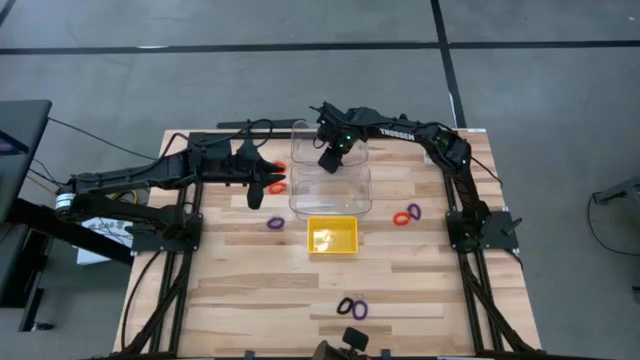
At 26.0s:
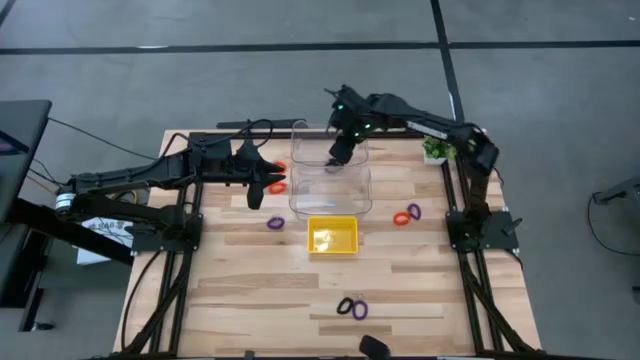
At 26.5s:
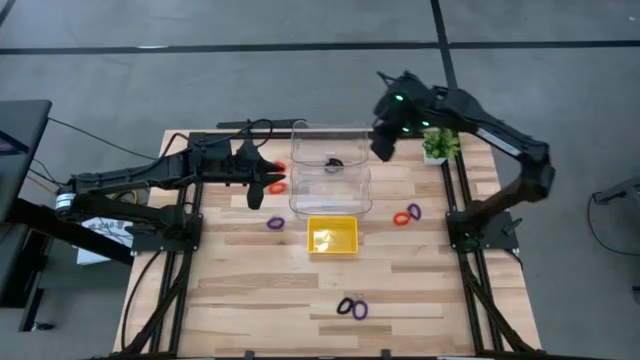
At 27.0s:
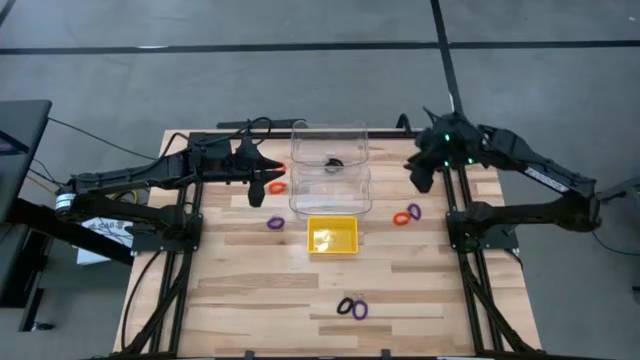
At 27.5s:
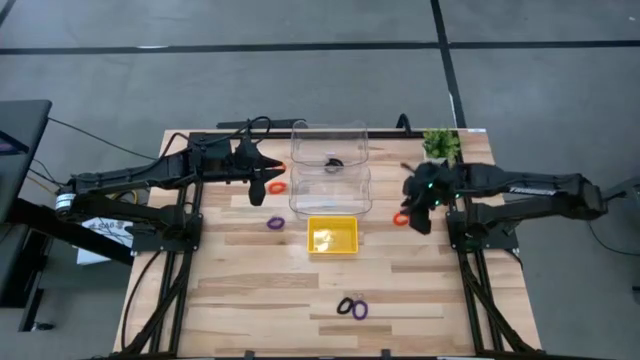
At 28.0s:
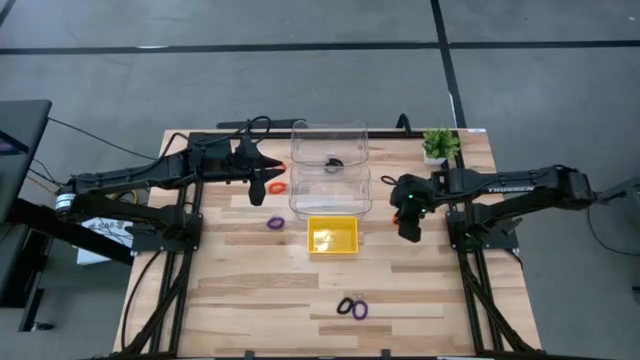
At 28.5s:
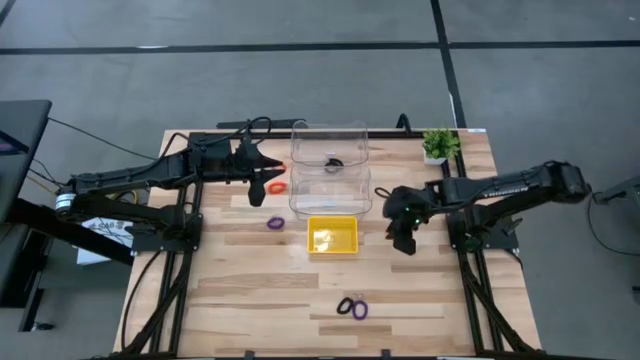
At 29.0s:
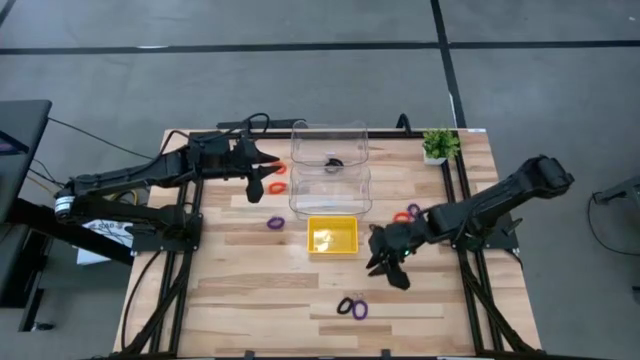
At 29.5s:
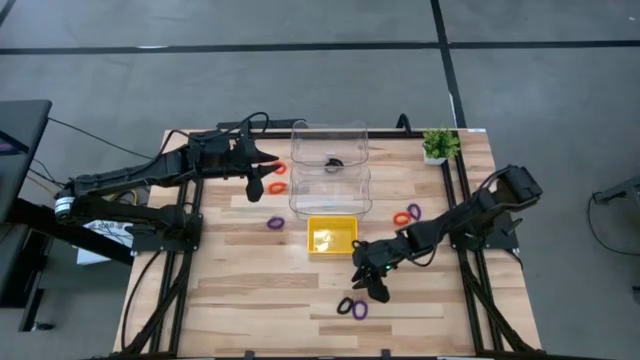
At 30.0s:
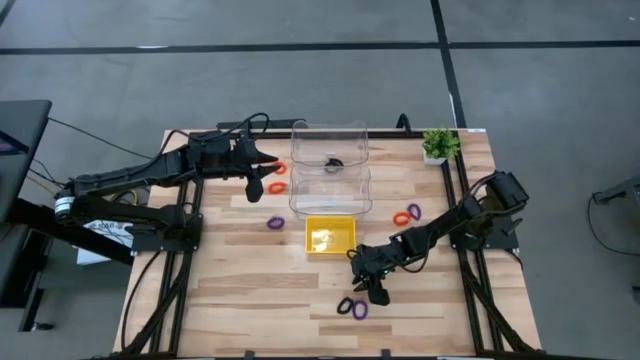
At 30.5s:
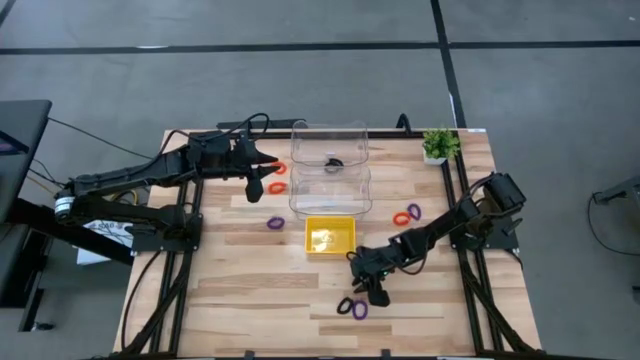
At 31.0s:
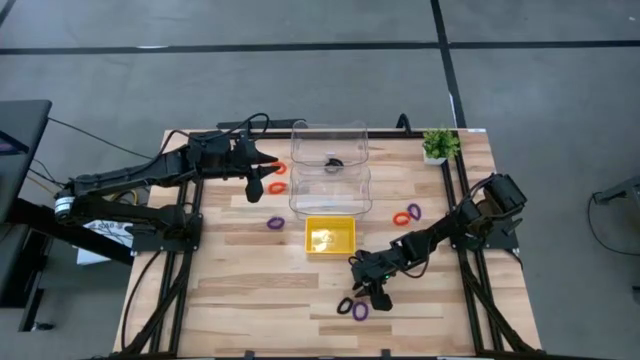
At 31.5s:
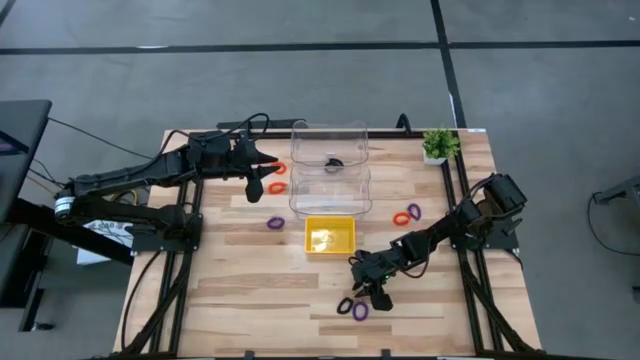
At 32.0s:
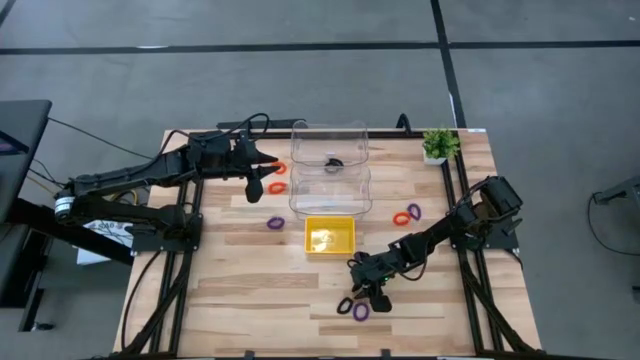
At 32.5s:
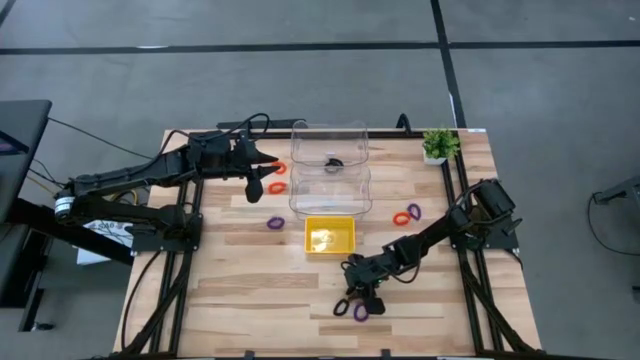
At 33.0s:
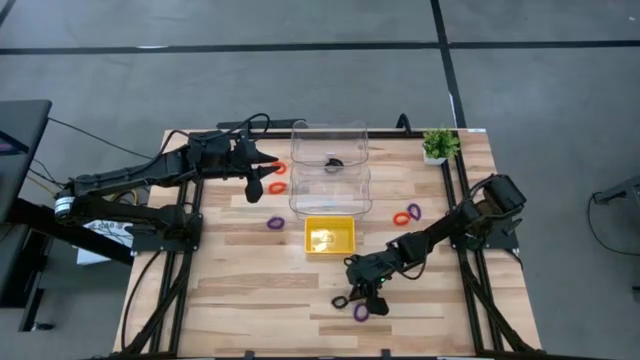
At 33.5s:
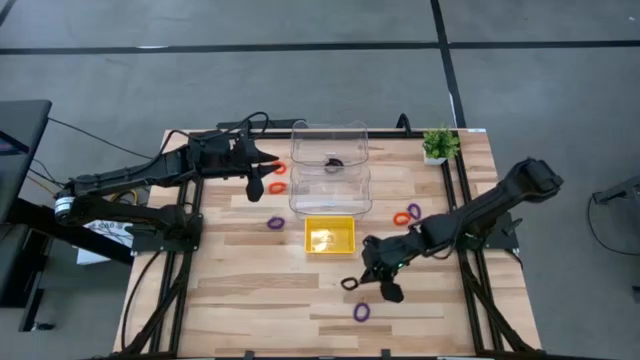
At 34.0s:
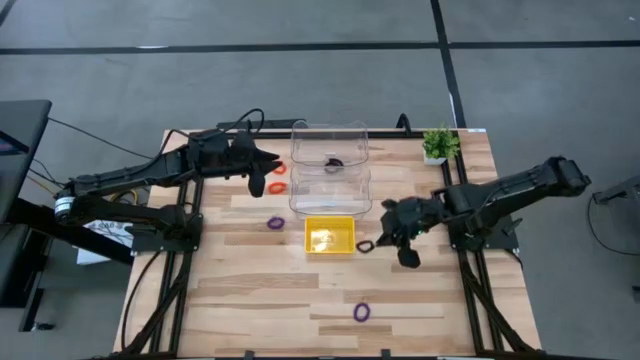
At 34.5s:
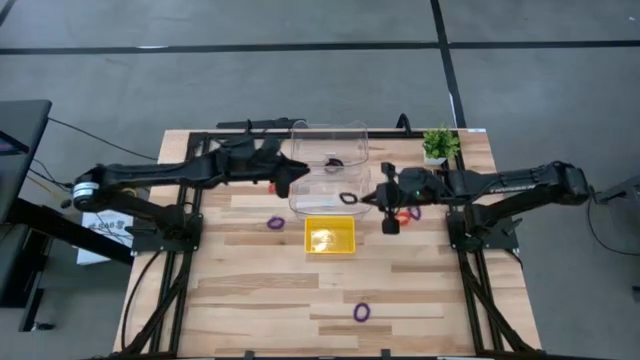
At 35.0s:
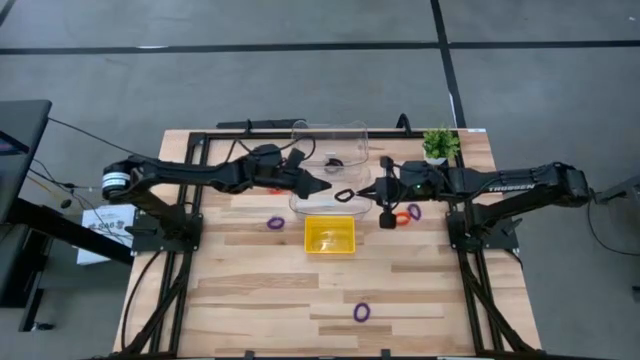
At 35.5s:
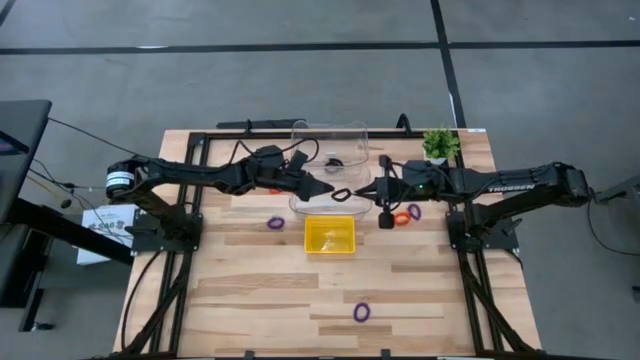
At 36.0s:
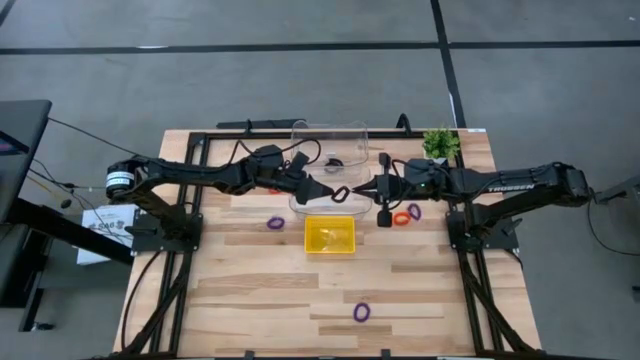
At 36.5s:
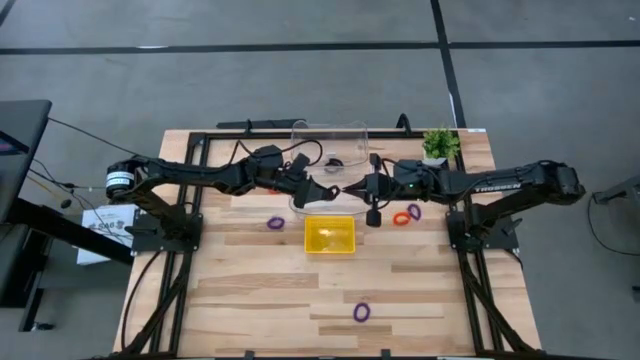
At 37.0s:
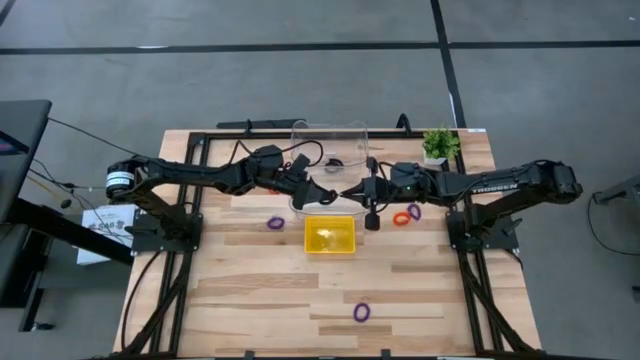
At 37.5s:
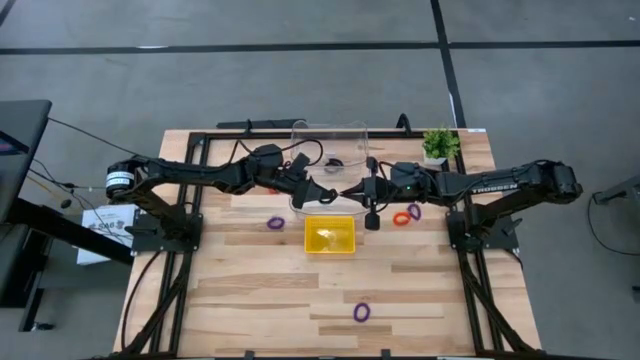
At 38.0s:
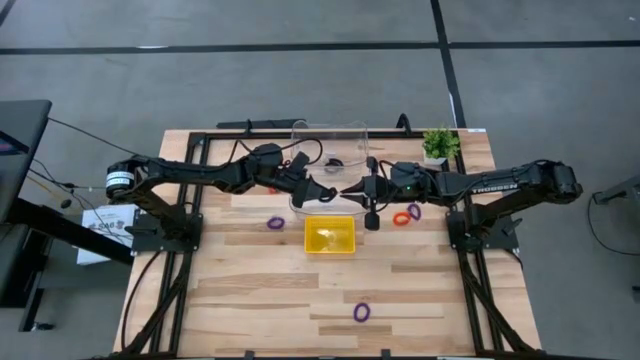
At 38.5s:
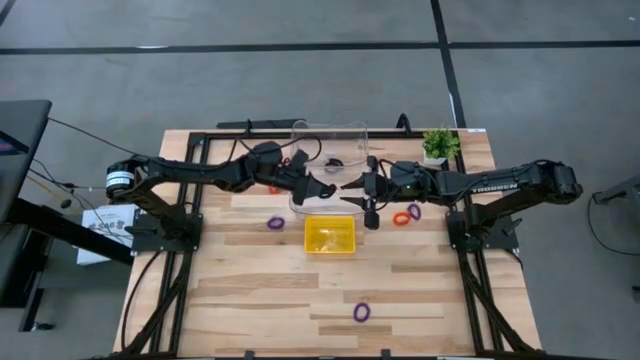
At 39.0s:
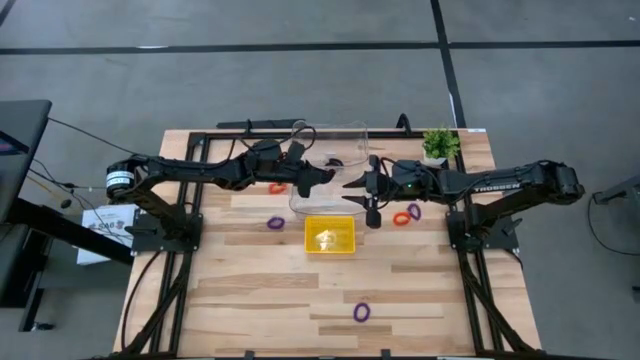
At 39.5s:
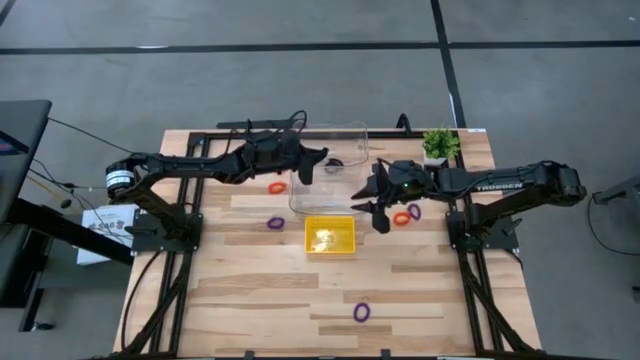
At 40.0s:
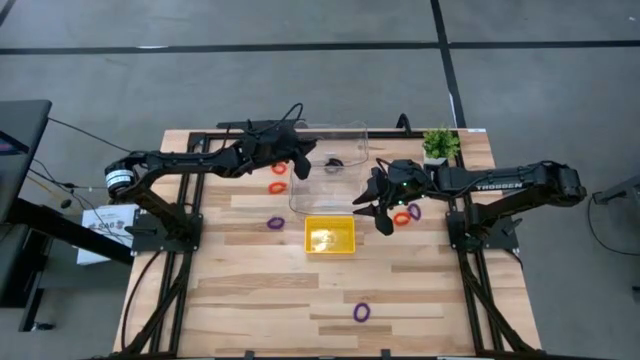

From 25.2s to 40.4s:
Task: Sort spring keychains
Put the black spring keychain into the top transparent bin

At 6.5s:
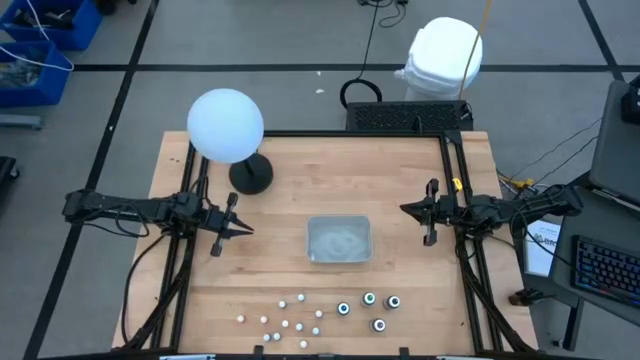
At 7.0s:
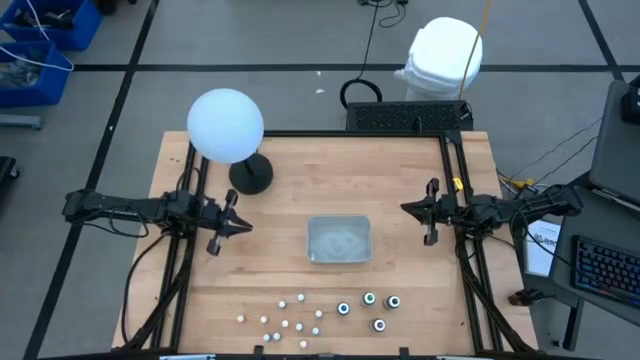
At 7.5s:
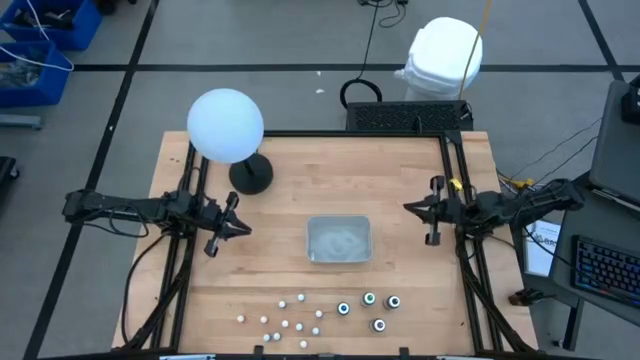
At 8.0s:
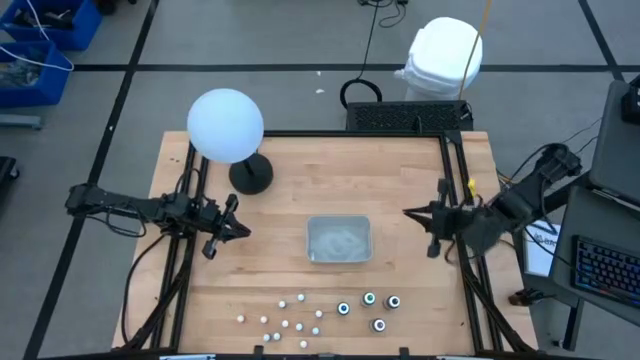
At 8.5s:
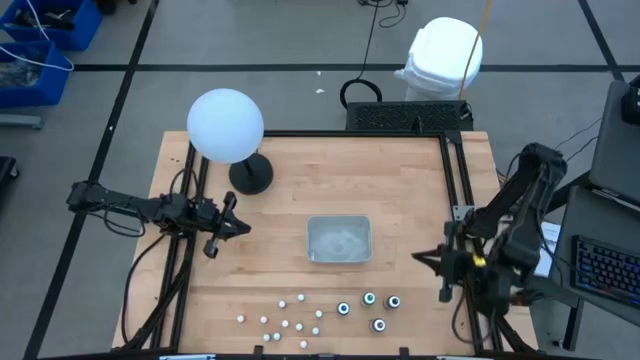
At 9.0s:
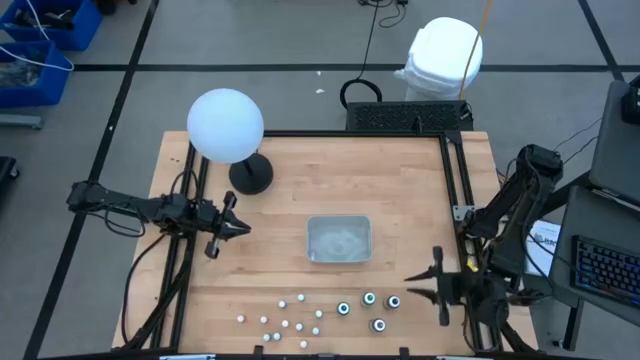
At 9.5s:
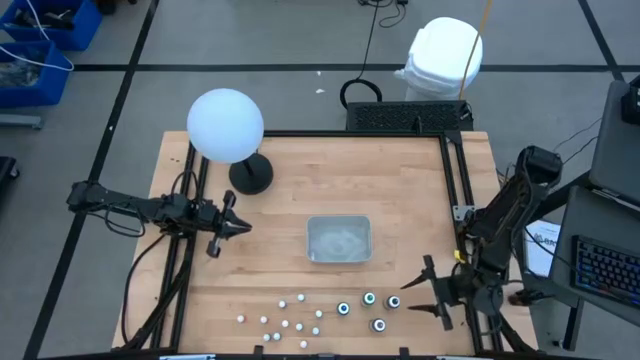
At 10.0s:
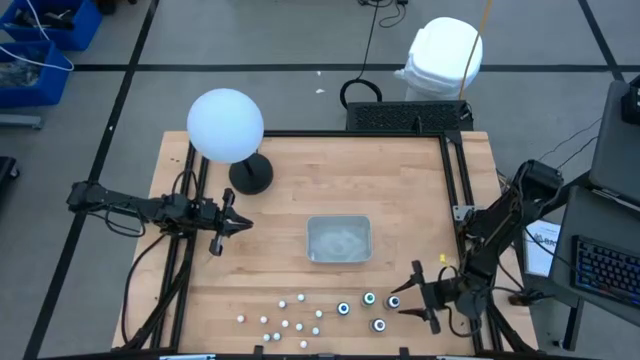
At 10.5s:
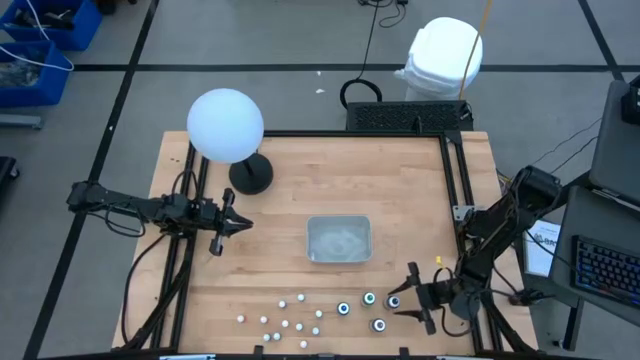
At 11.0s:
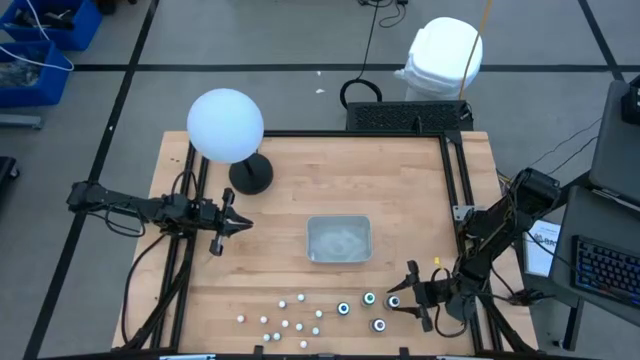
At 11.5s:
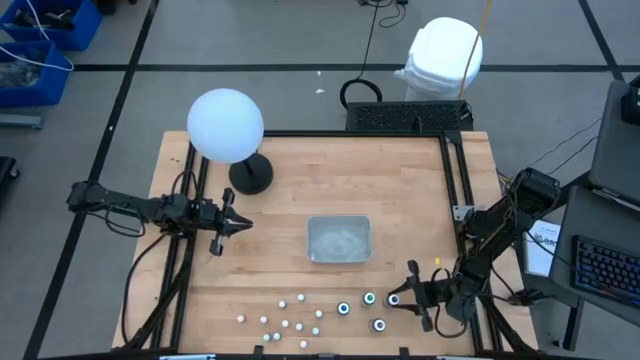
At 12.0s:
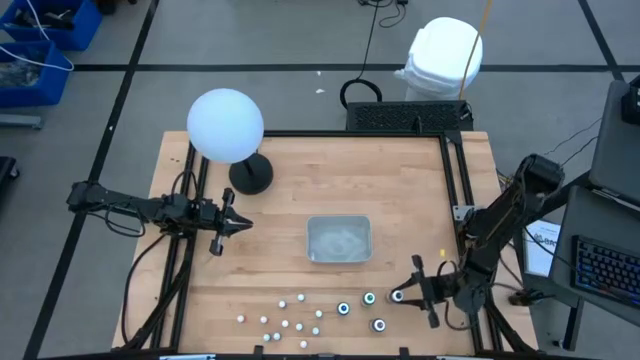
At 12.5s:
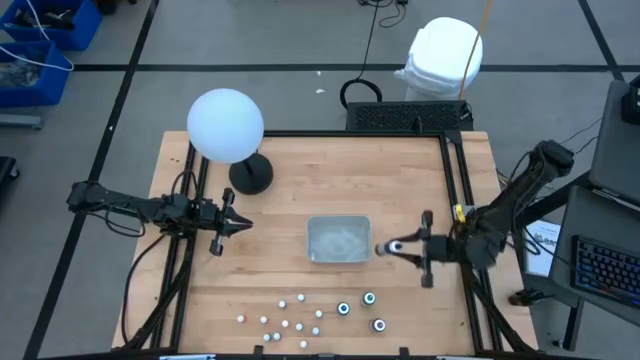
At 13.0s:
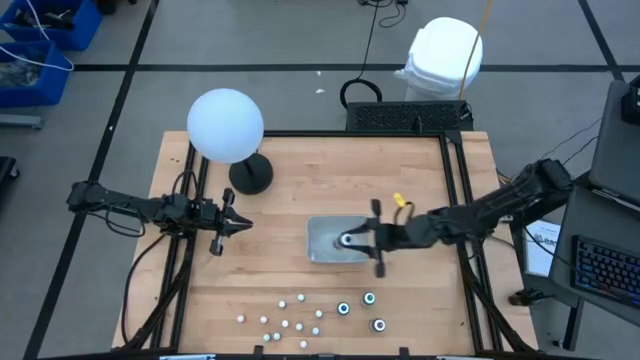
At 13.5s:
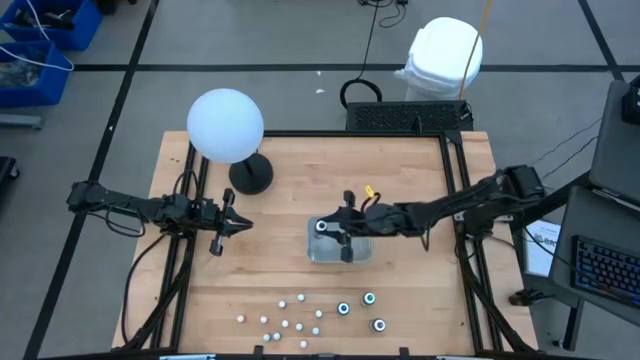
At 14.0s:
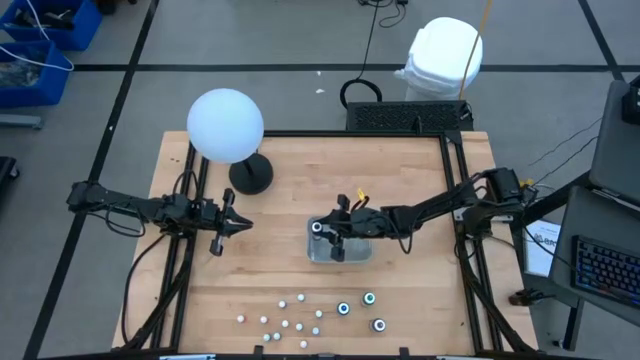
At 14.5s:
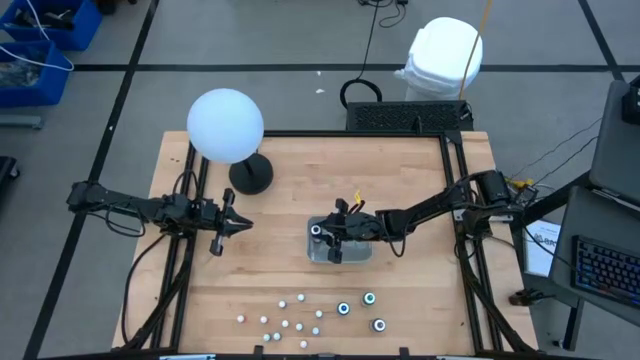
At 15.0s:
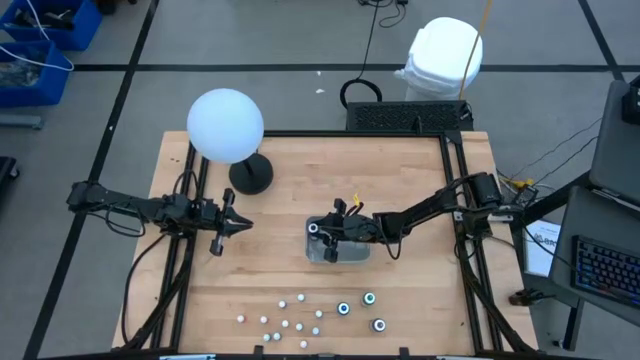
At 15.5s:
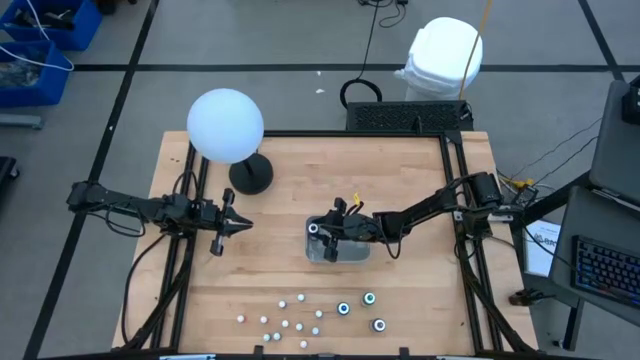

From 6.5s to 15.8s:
Task: Pick & Place food coloring
Put the large black food coloring bottle into the gray bin
